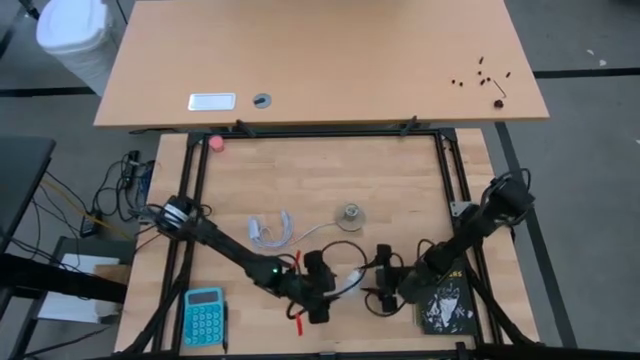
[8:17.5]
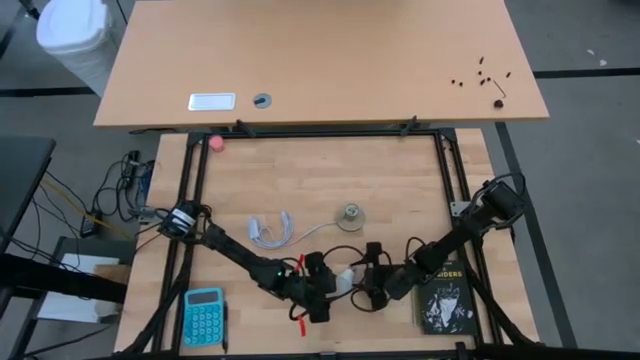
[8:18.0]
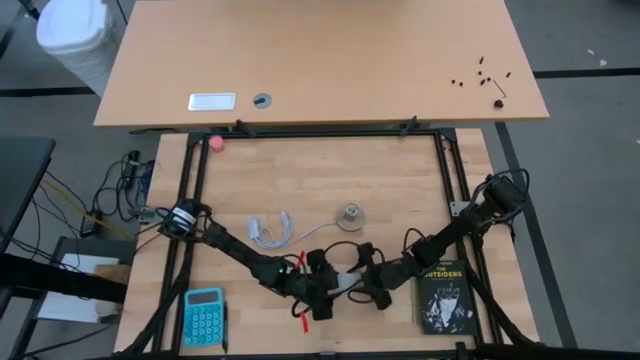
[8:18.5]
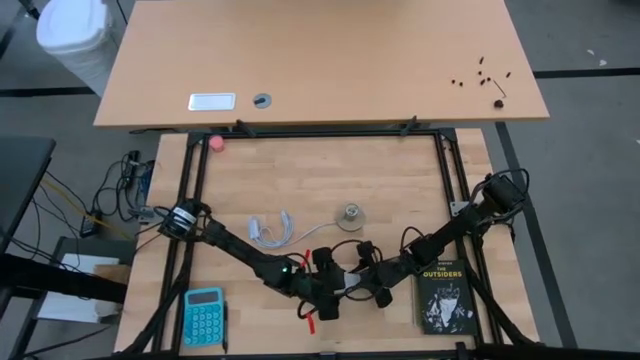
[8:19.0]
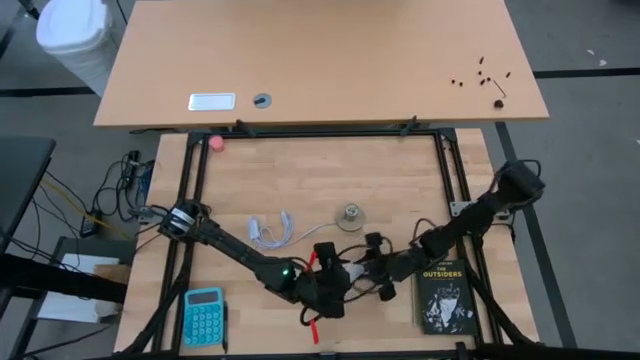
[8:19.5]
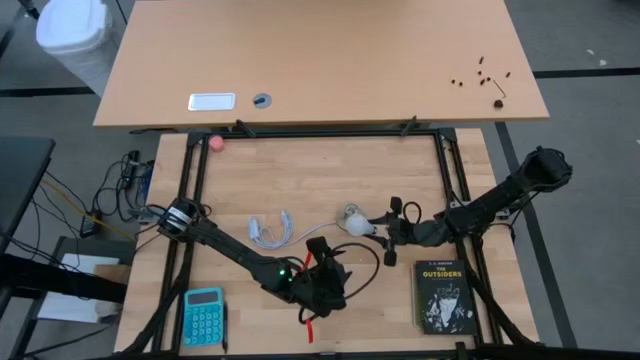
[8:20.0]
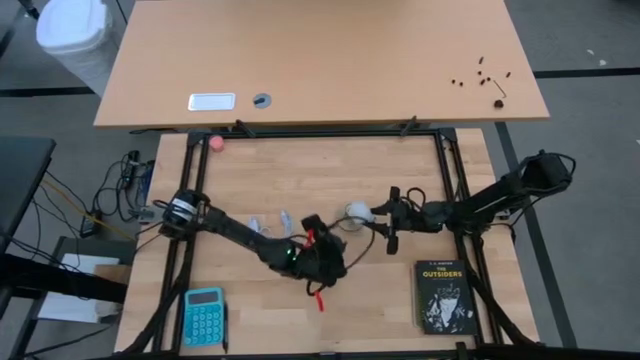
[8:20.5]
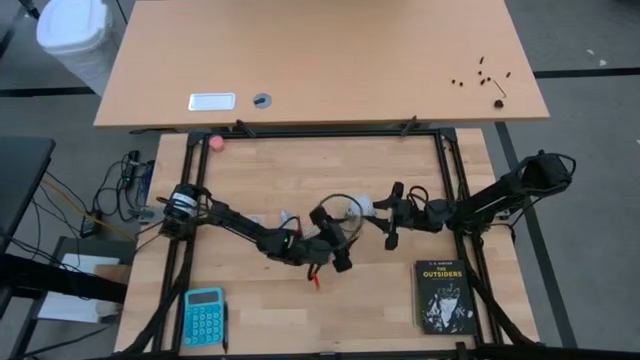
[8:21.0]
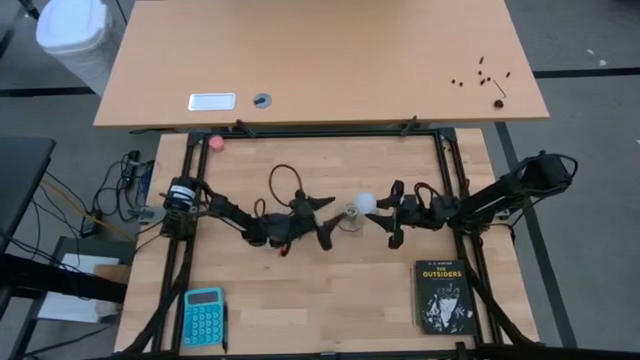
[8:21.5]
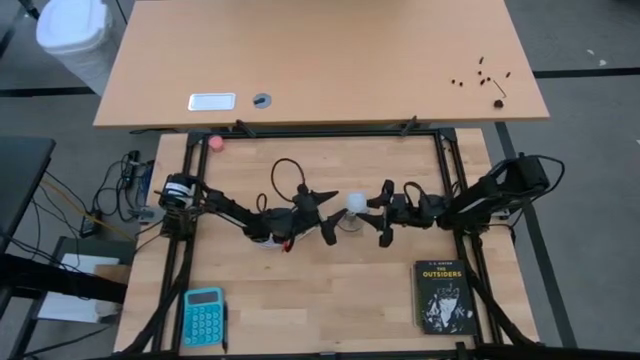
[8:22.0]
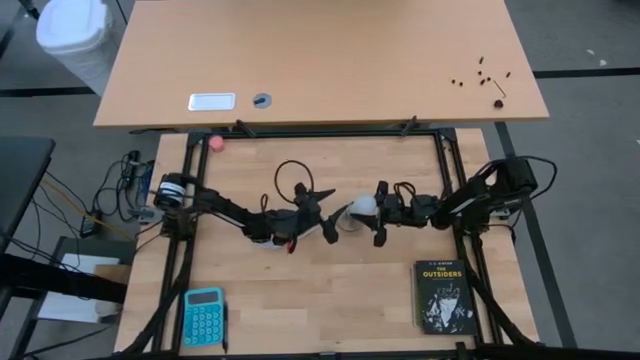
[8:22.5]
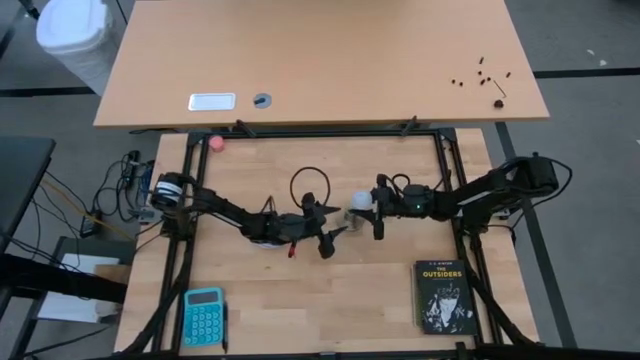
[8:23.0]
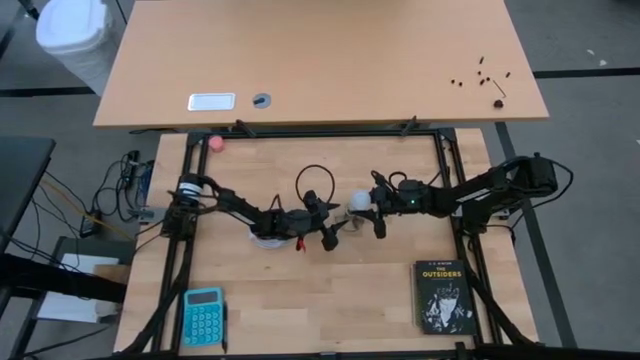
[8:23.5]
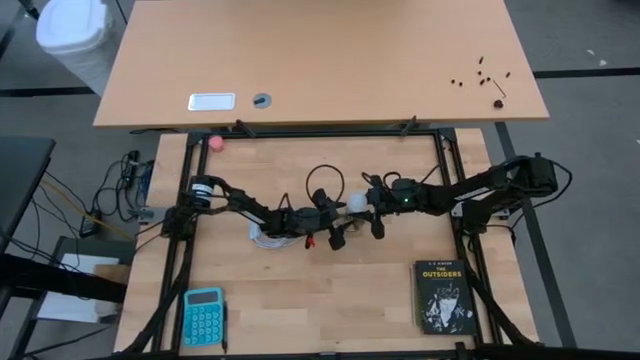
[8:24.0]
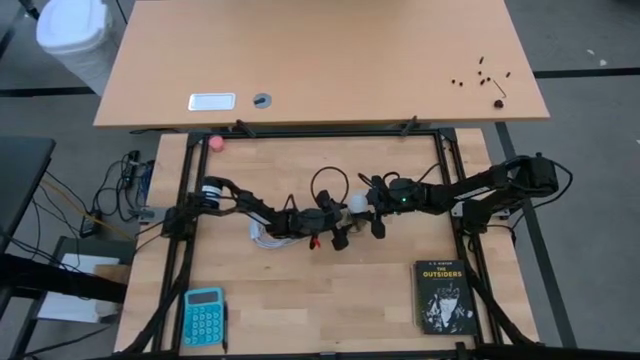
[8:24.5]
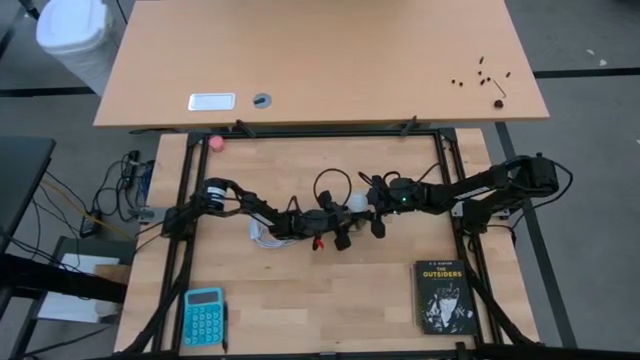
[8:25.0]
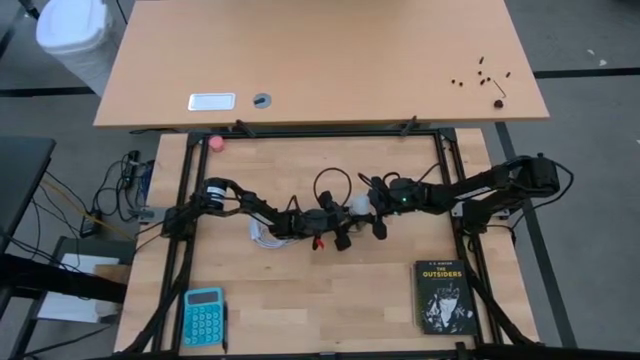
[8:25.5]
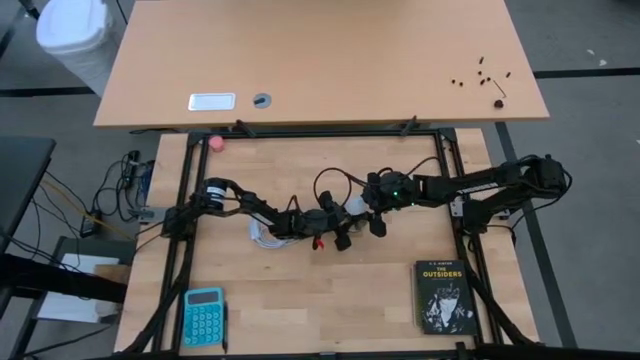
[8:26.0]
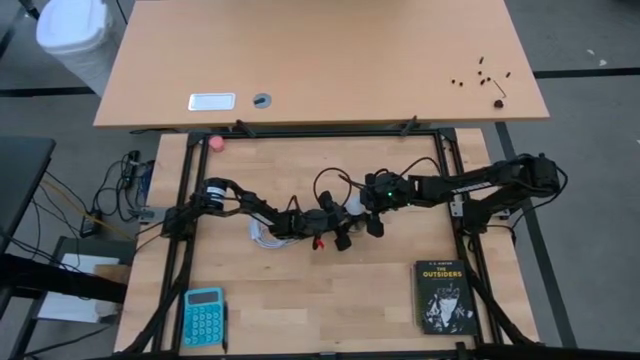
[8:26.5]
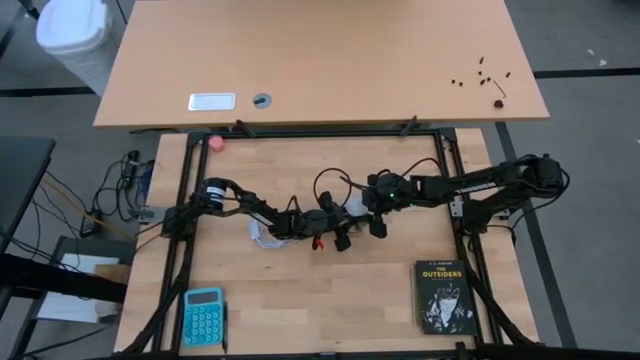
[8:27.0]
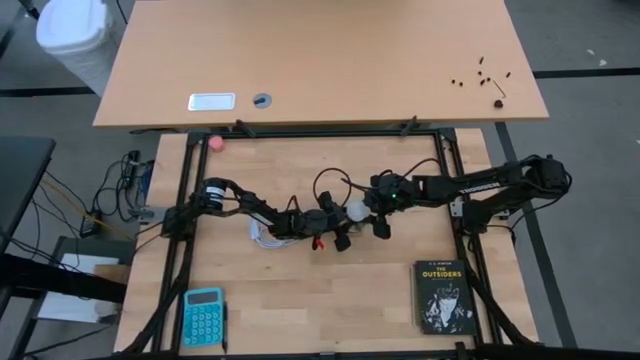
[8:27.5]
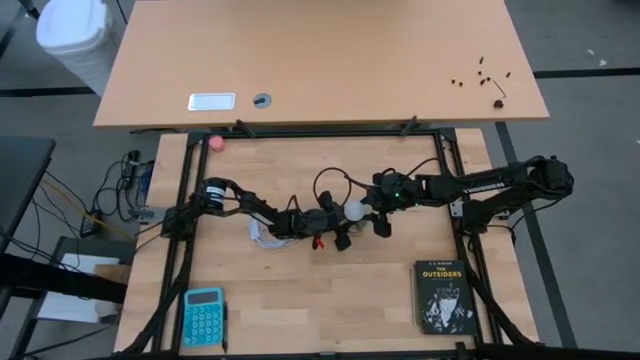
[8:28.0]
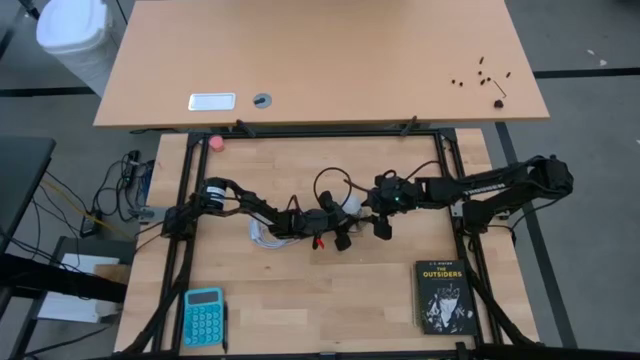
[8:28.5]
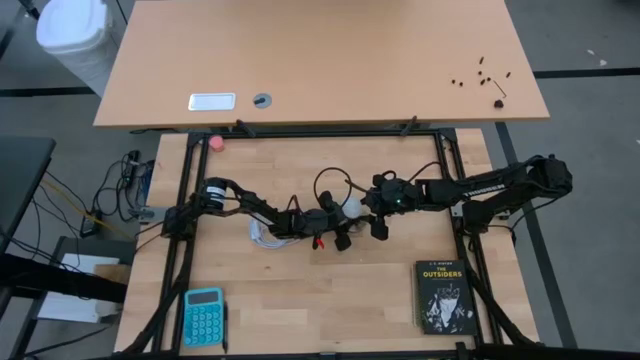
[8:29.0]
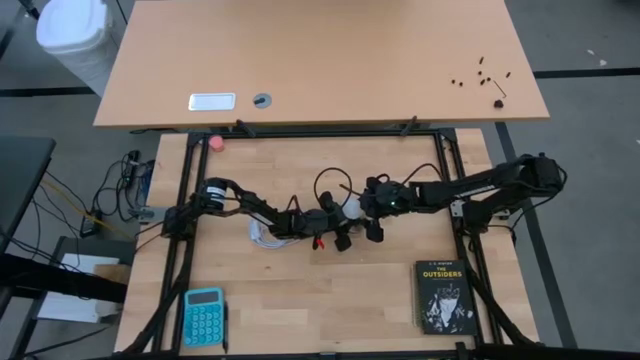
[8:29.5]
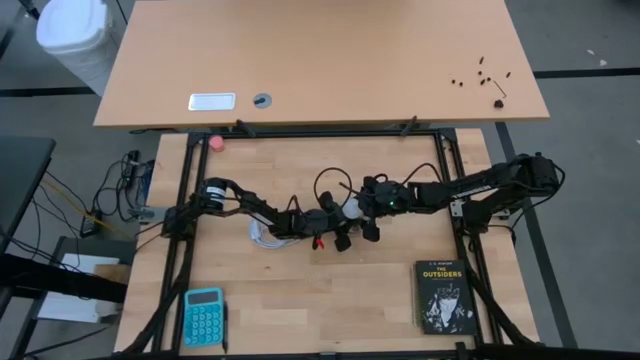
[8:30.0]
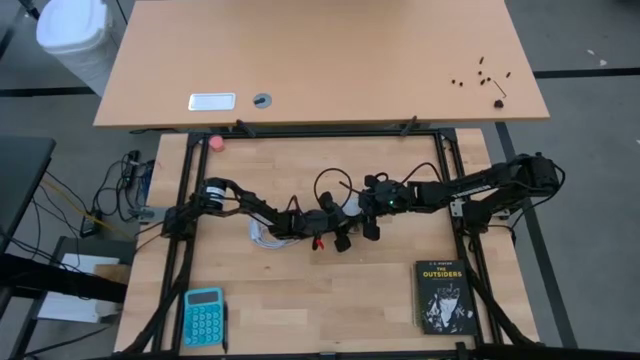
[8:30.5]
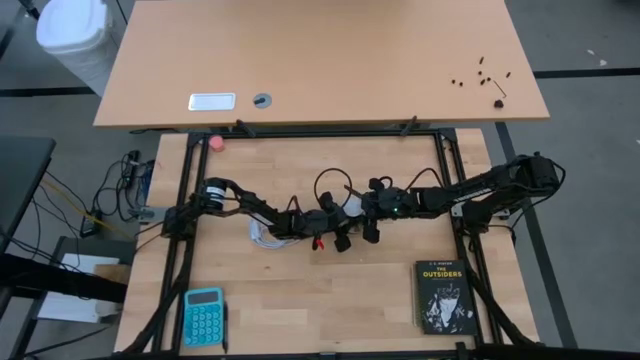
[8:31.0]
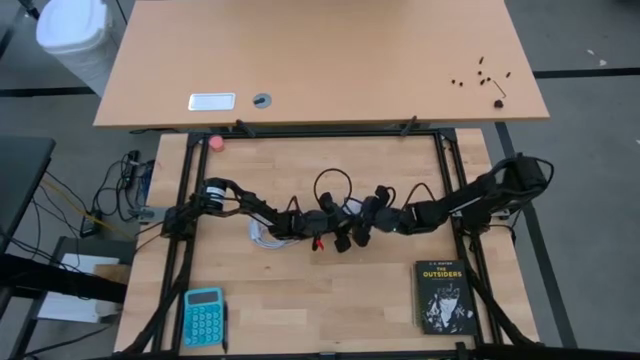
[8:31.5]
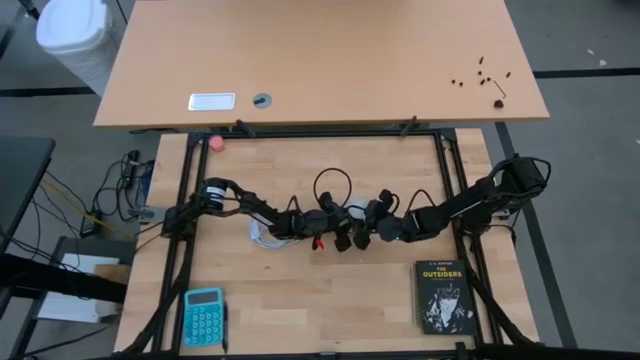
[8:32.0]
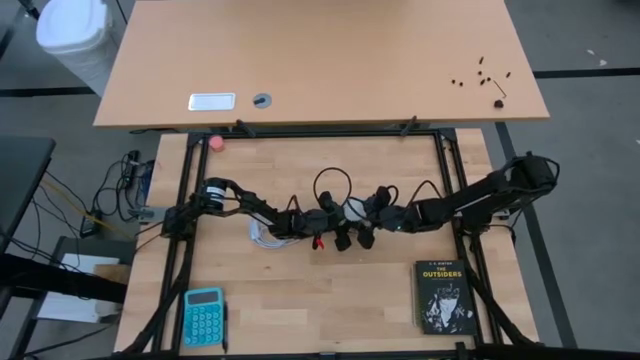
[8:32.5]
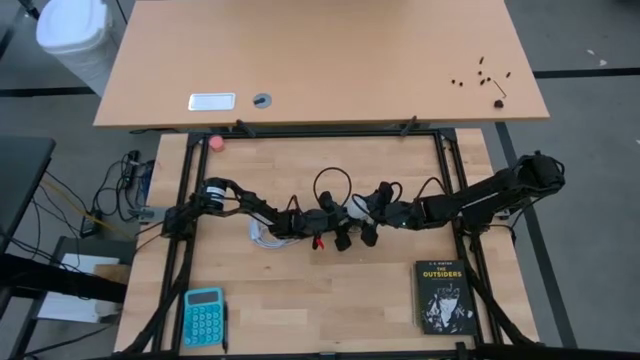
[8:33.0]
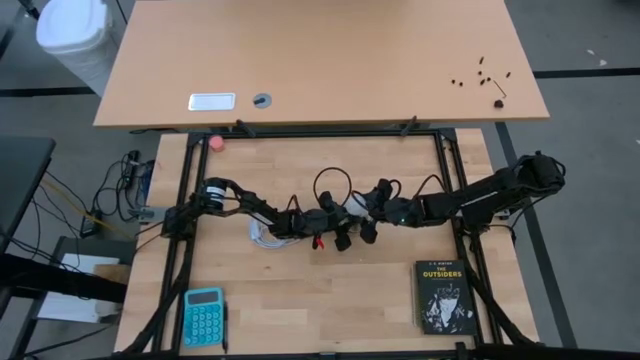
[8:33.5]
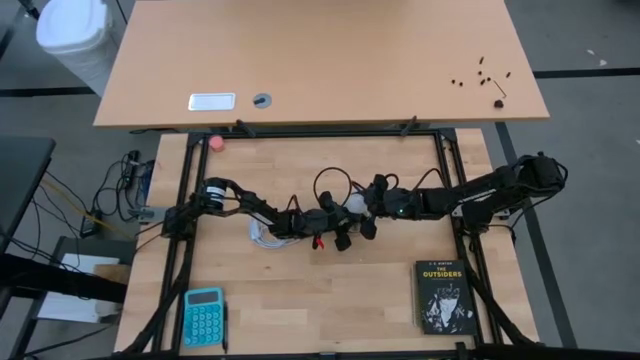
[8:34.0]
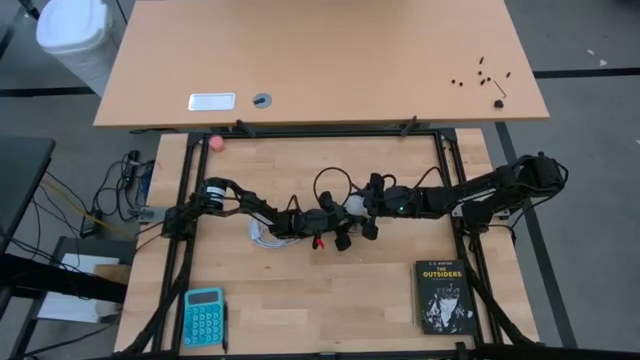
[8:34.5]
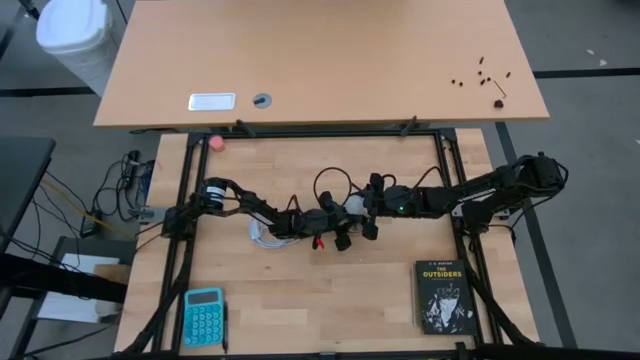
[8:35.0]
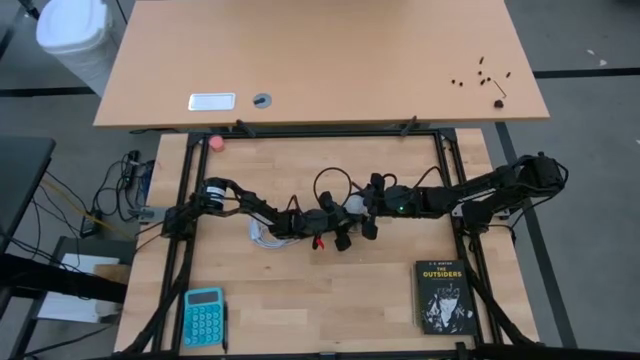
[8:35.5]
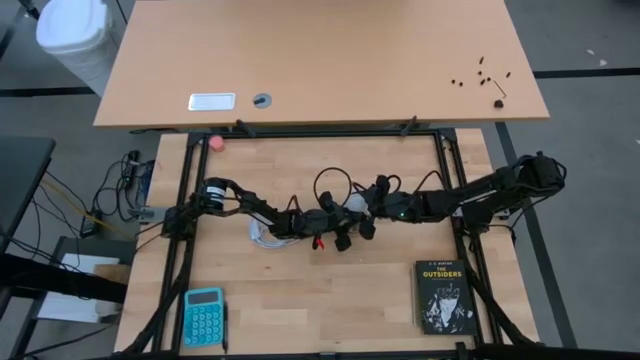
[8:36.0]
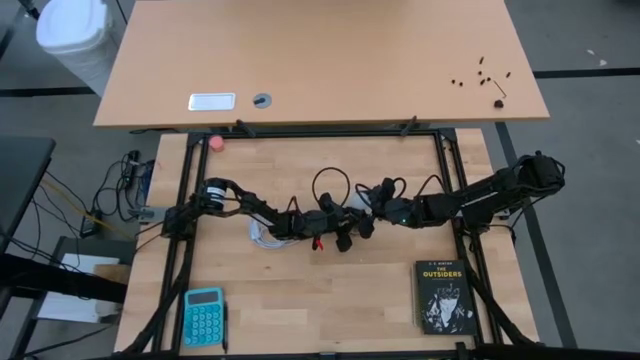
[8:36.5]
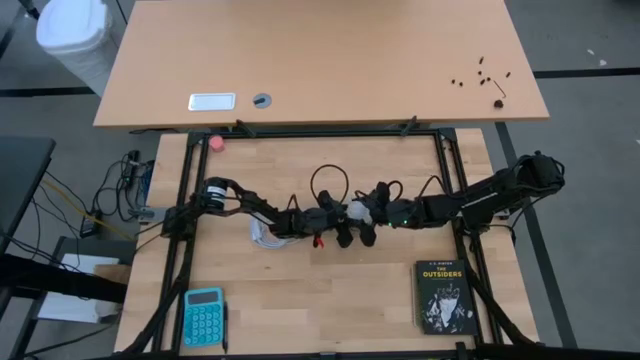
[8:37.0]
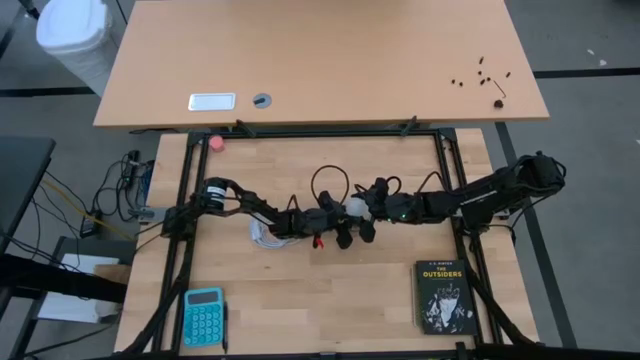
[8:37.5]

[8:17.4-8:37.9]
Task: Screw lightbulb
Insert the white lightbulb into the silver lamp

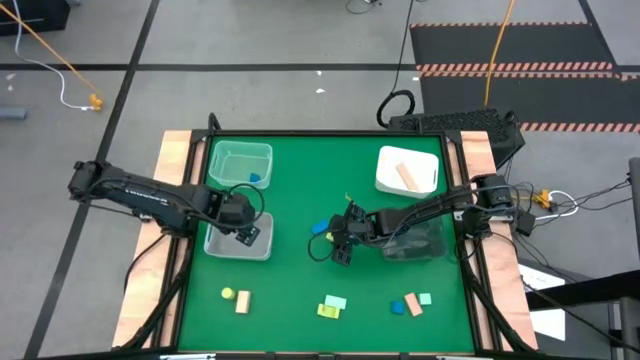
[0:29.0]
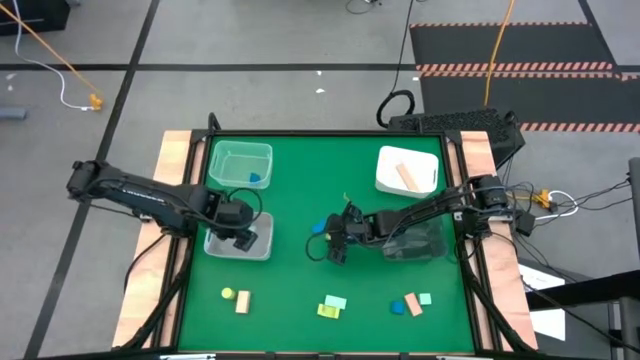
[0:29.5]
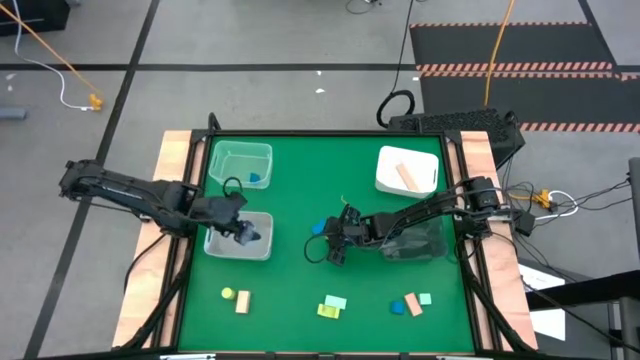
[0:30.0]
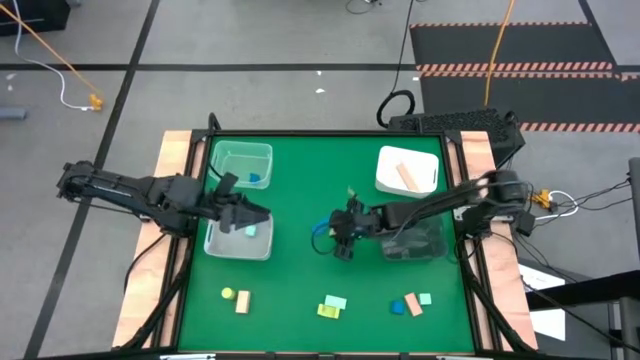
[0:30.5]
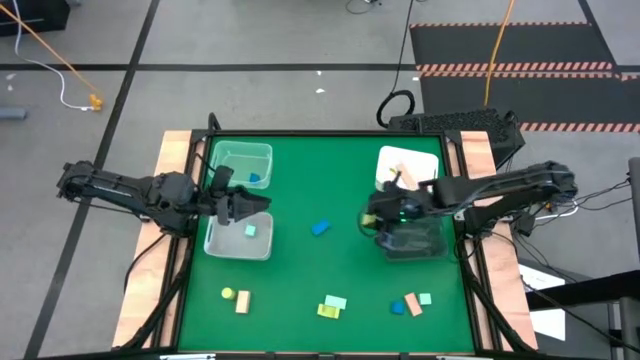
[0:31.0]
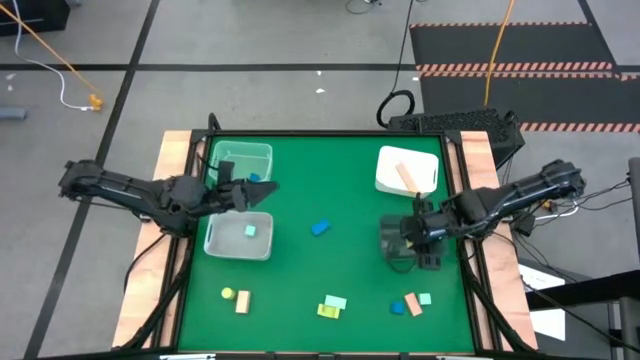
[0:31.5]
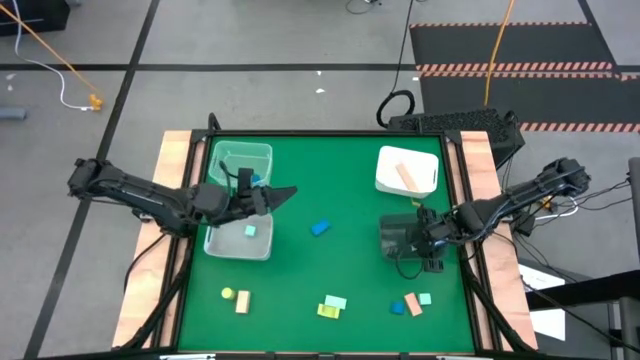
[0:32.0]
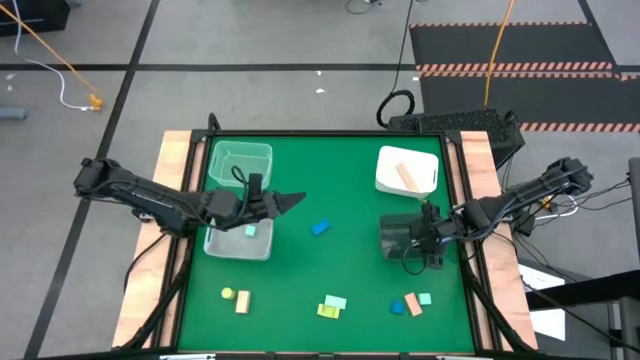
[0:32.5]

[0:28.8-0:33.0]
Task: Sort & place blocks by color
Put the top green block into the black transparent bin
